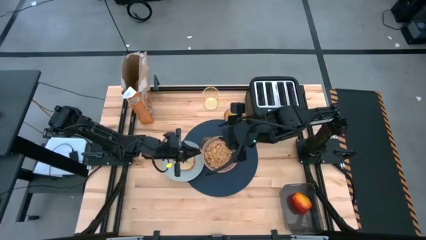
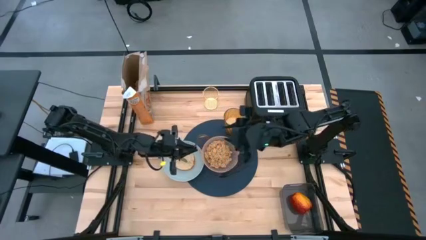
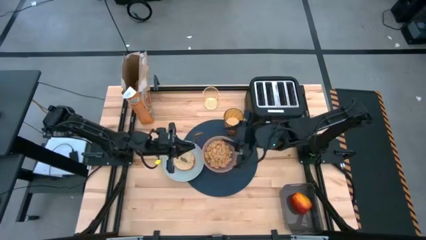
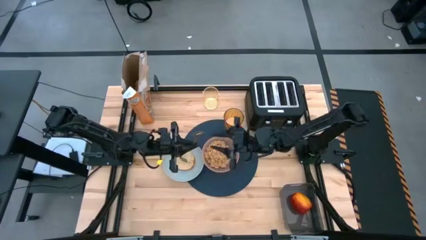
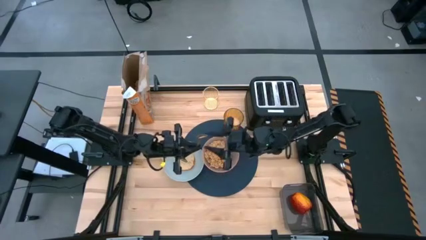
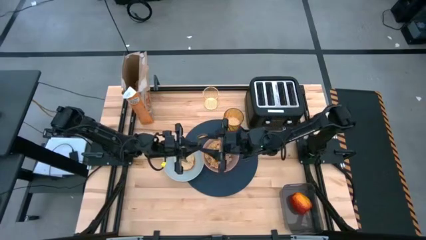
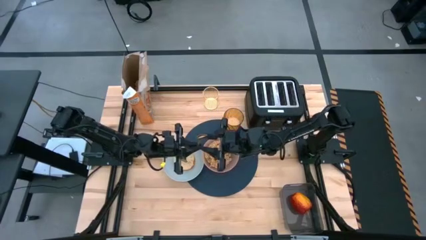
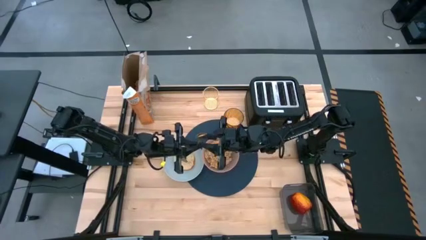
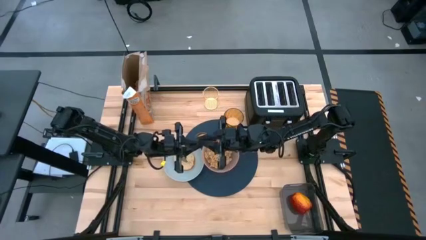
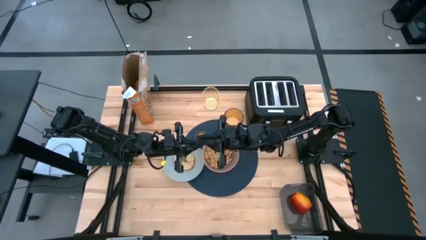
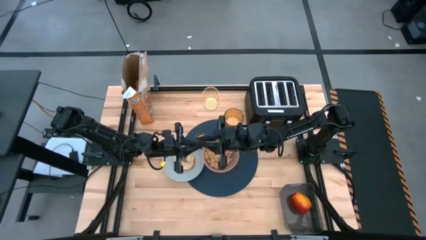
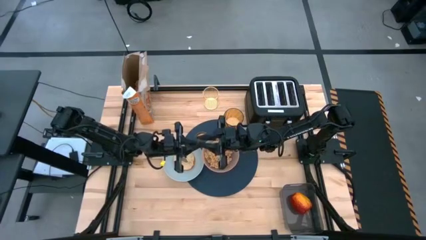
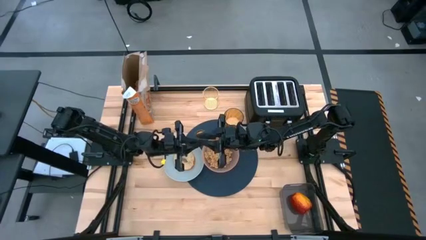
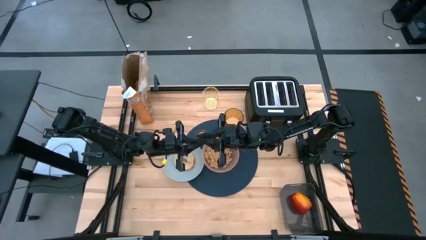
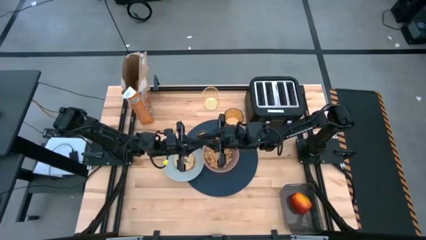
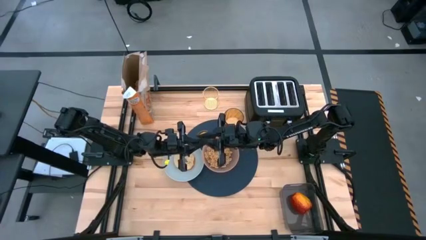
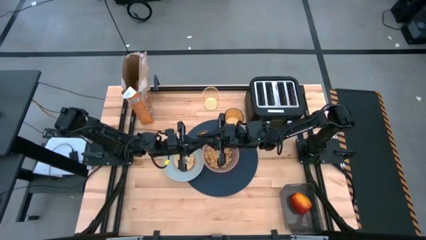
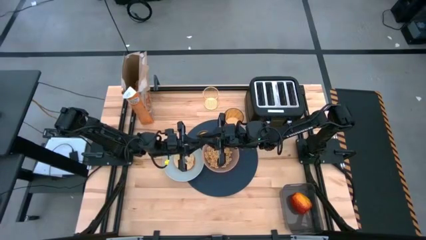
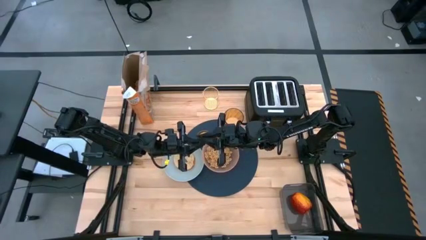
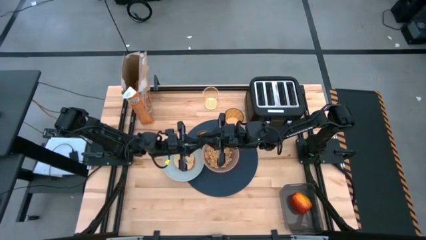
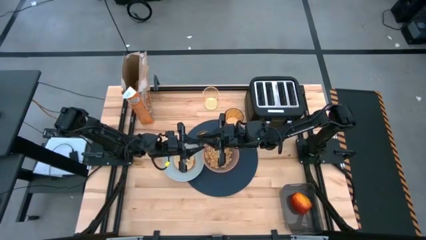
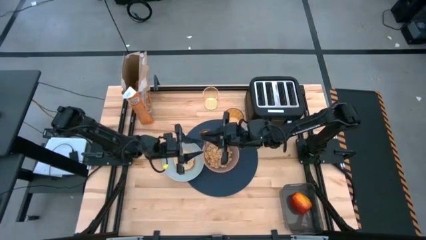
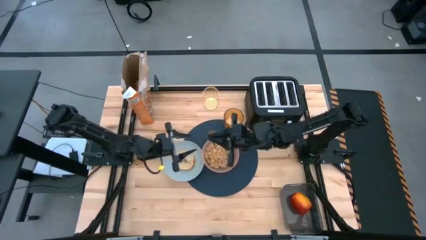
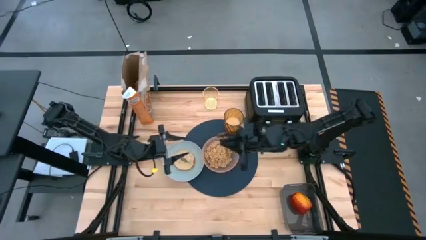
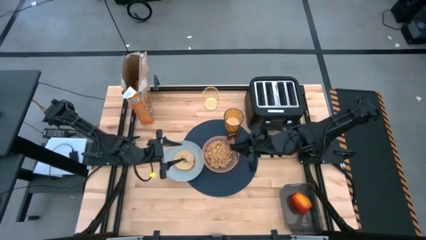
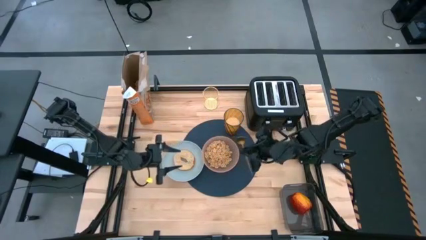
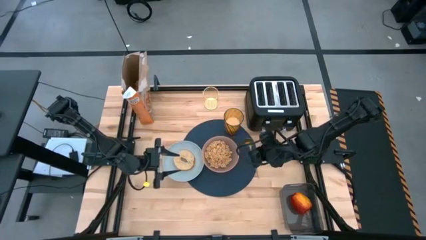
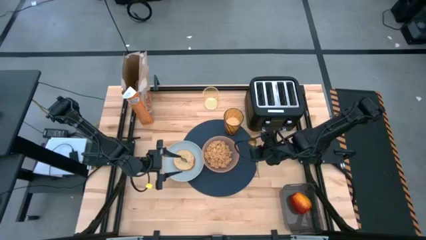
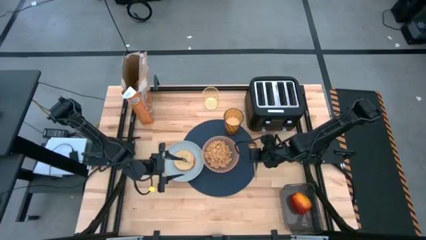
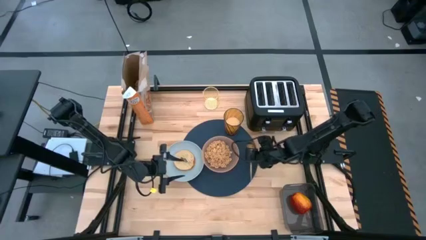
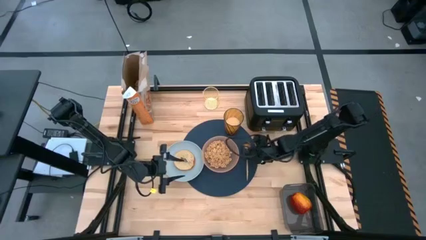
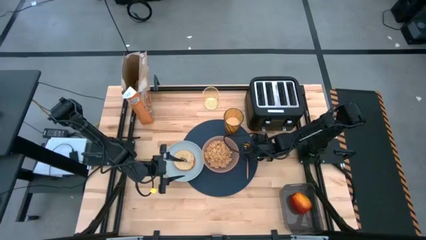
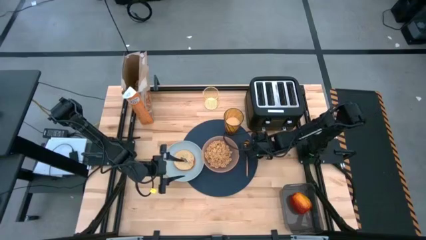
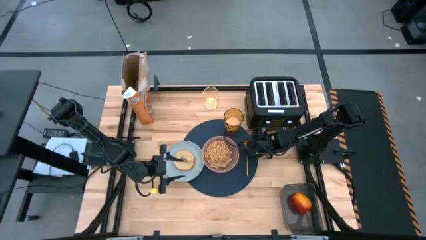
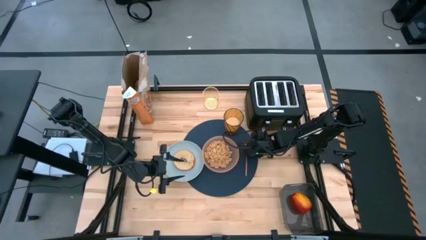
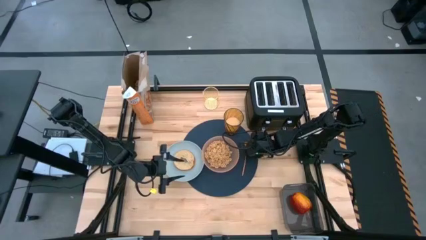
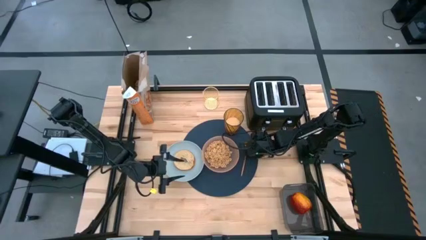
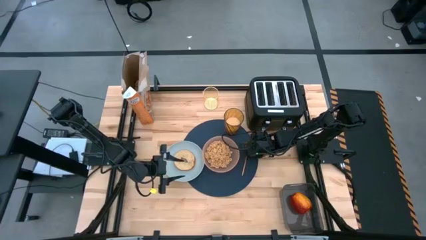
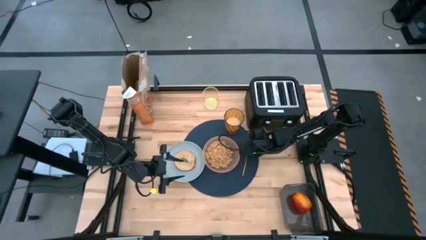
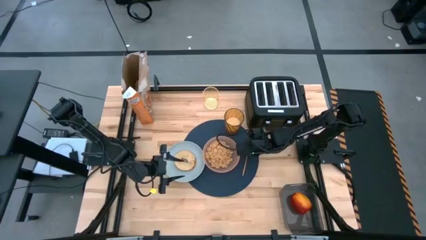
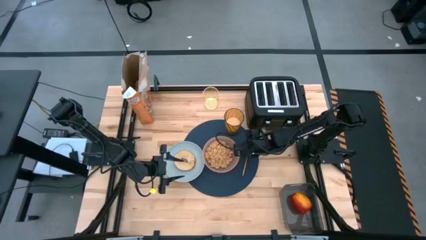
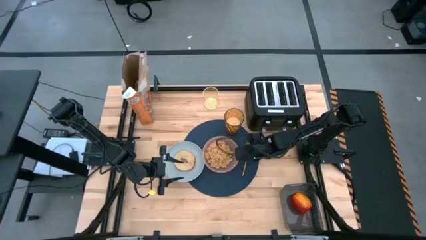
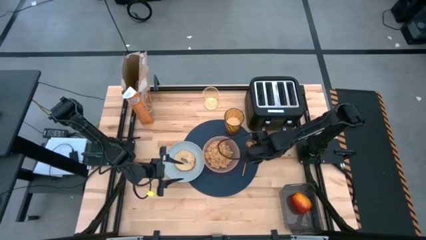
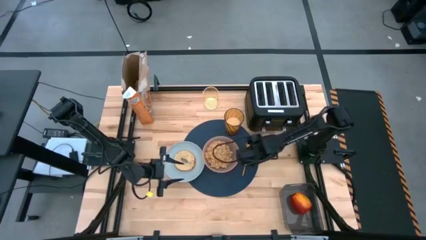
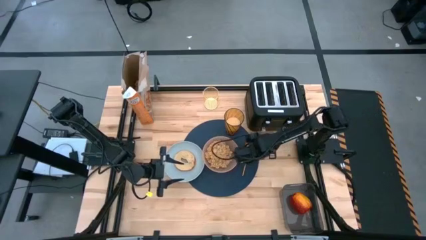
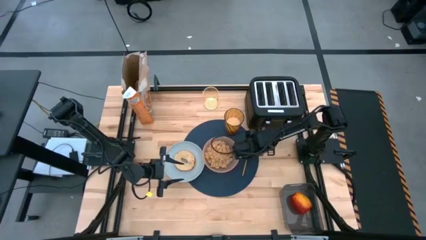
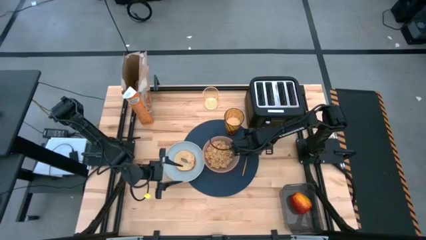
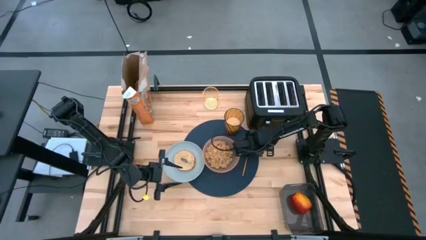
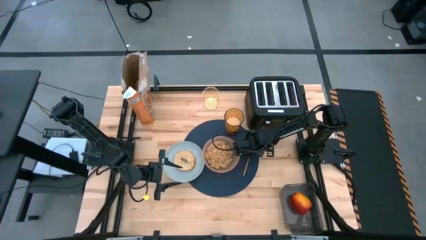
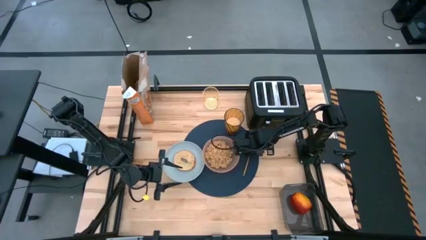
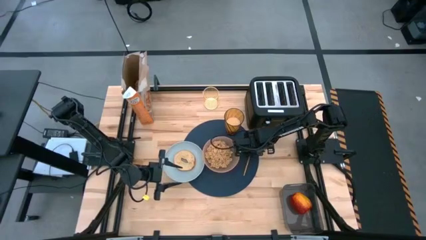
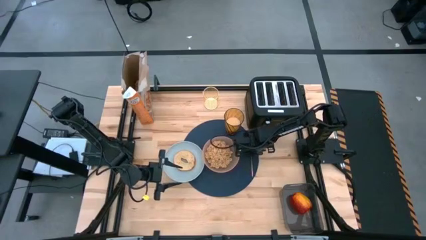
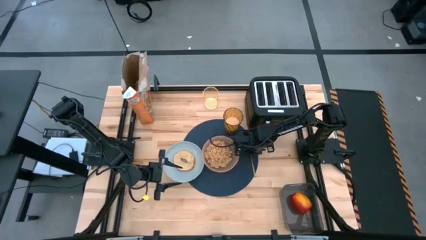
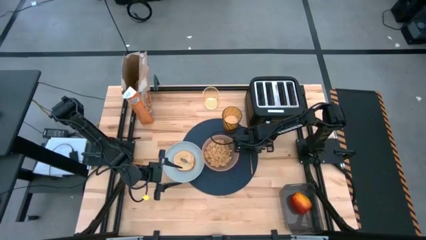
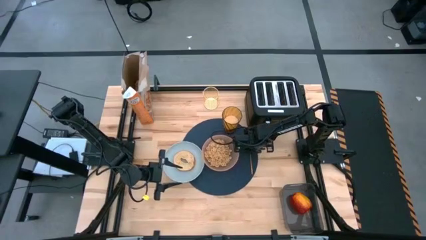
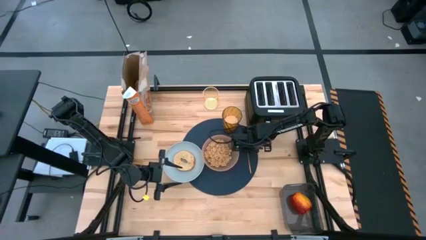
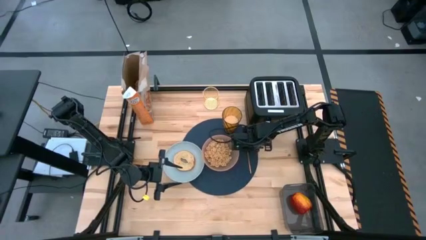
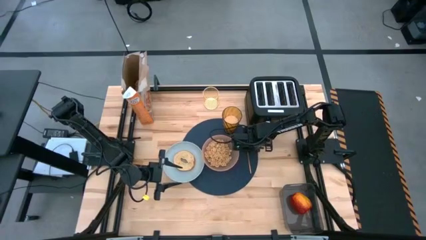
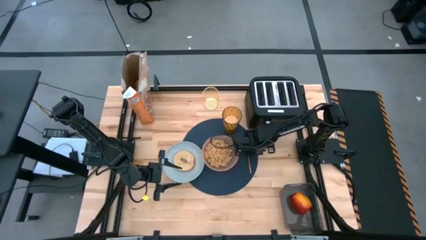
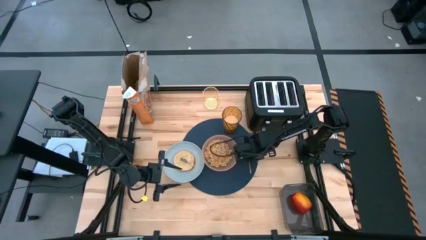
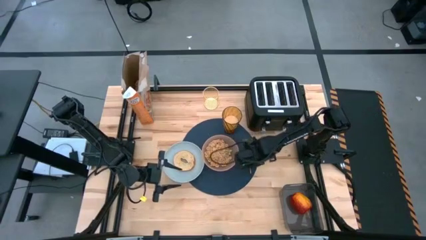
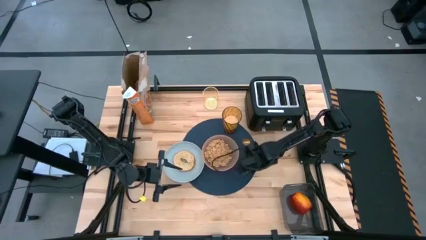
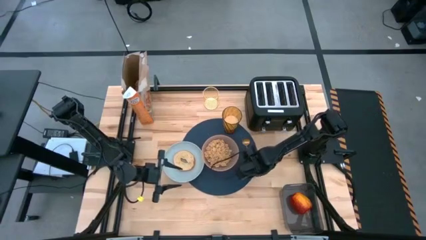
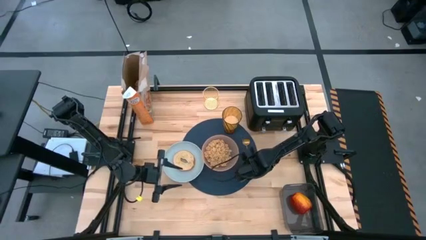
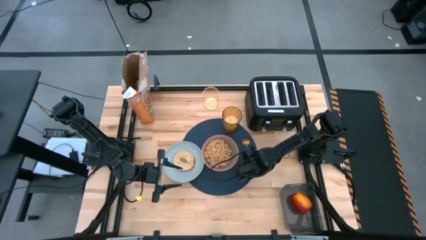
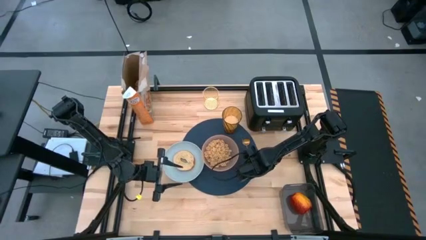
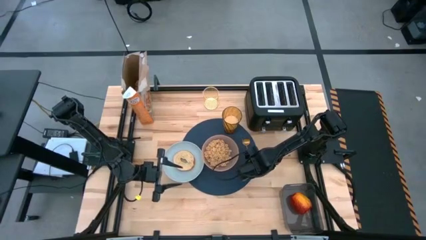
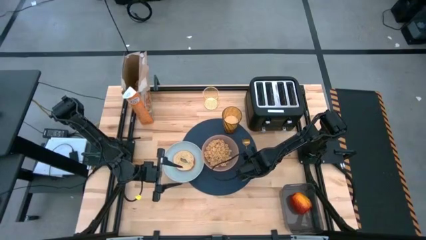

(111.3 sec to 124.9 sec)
Task: Arrange a breakfast setting
Put the gold spoon on the right of the orange bowl
